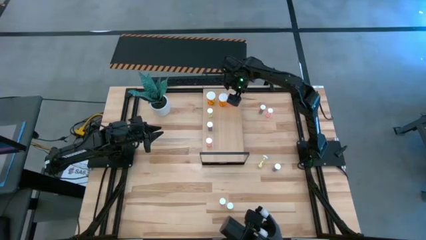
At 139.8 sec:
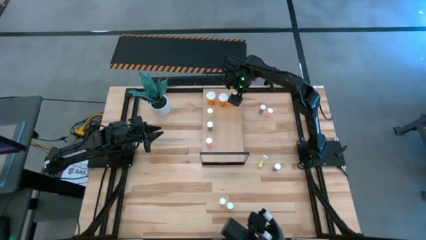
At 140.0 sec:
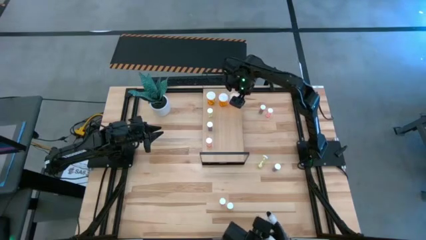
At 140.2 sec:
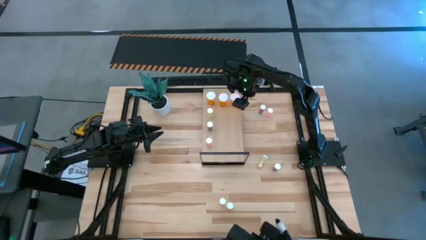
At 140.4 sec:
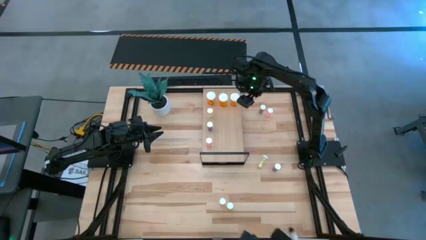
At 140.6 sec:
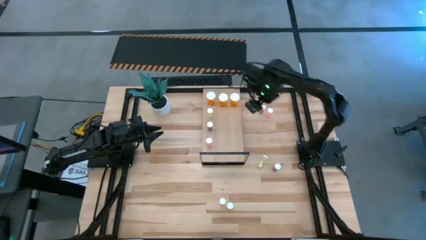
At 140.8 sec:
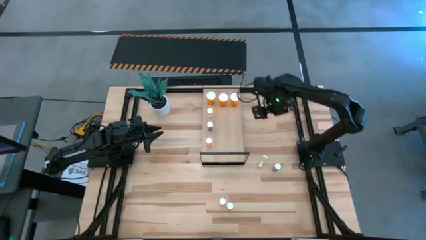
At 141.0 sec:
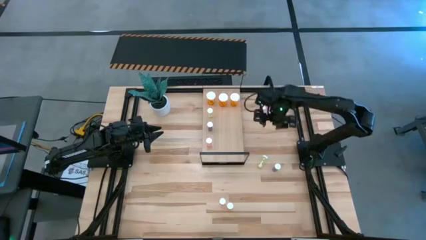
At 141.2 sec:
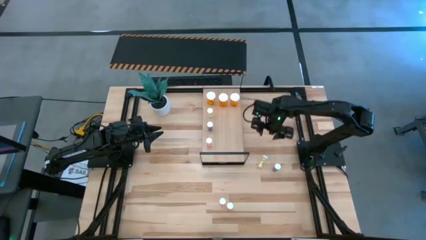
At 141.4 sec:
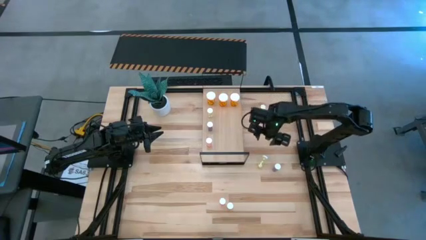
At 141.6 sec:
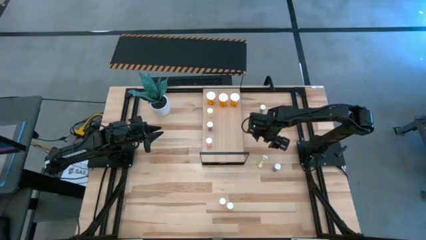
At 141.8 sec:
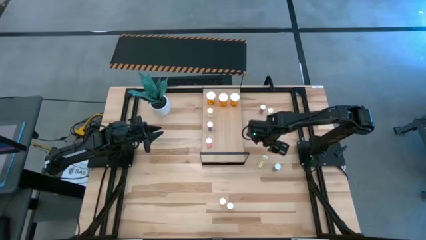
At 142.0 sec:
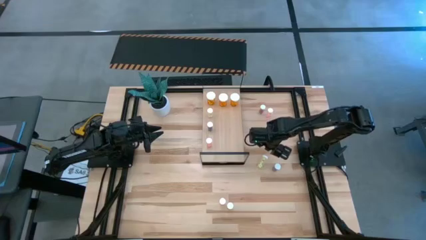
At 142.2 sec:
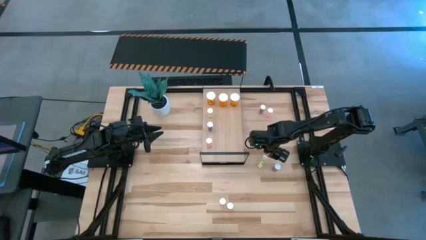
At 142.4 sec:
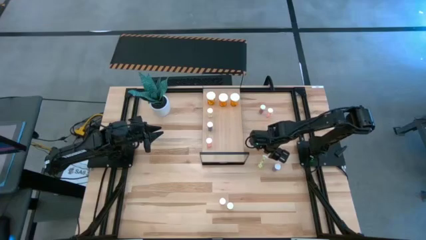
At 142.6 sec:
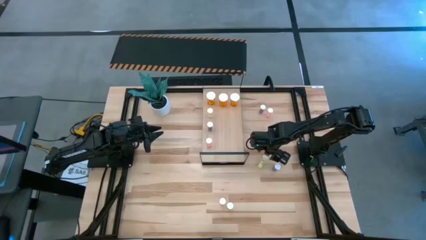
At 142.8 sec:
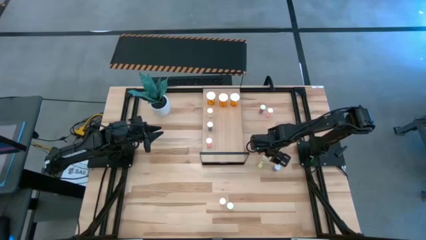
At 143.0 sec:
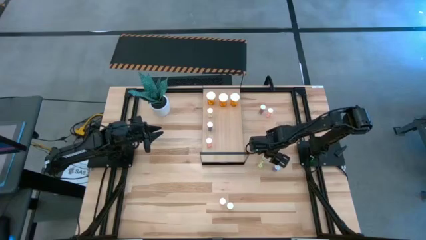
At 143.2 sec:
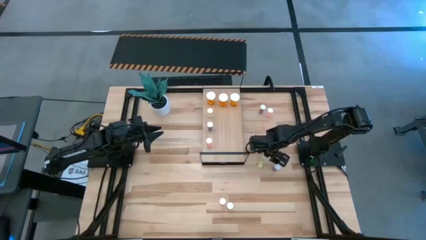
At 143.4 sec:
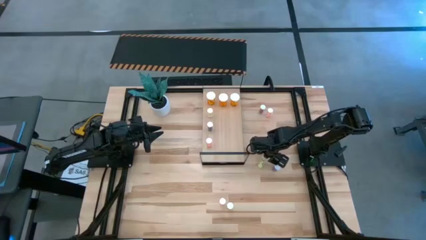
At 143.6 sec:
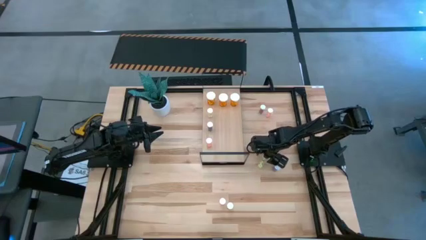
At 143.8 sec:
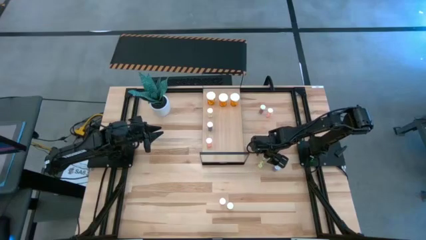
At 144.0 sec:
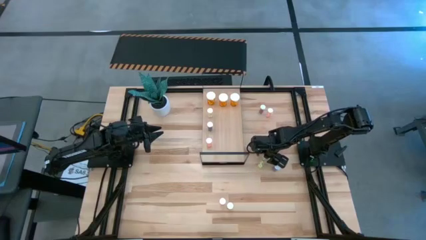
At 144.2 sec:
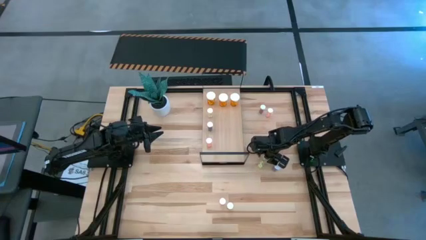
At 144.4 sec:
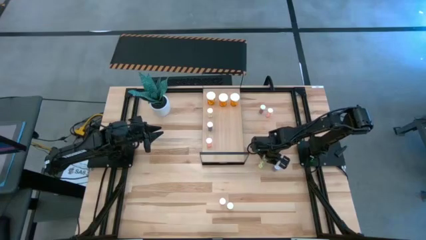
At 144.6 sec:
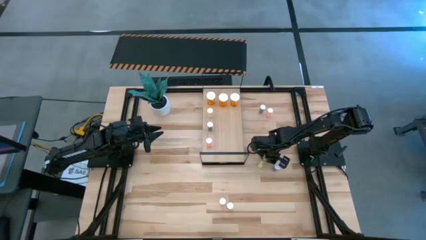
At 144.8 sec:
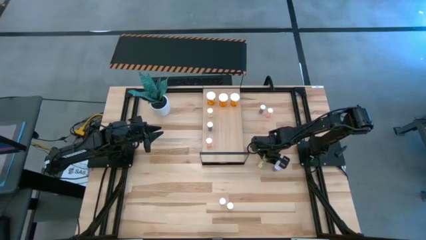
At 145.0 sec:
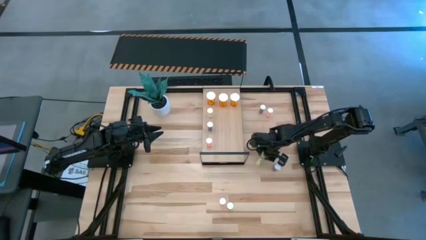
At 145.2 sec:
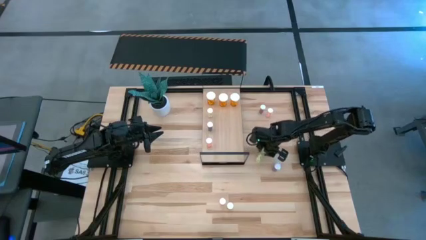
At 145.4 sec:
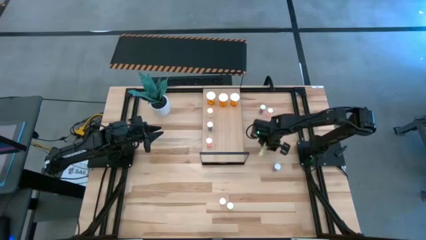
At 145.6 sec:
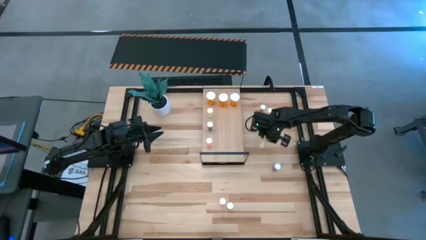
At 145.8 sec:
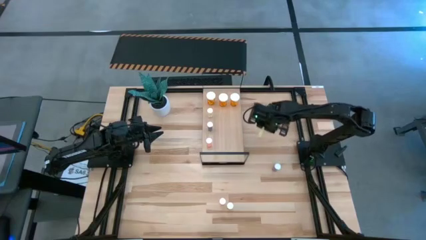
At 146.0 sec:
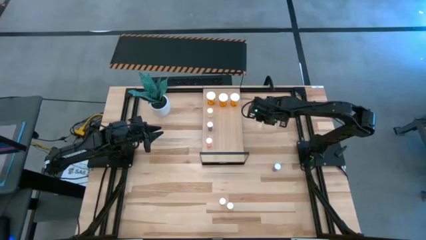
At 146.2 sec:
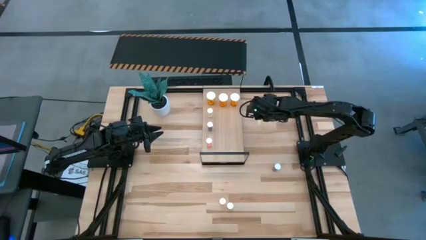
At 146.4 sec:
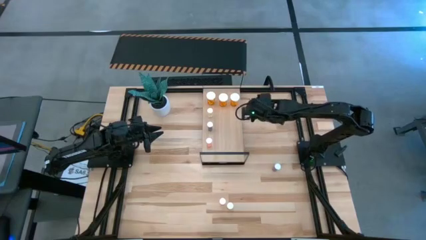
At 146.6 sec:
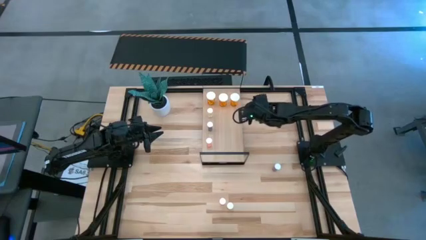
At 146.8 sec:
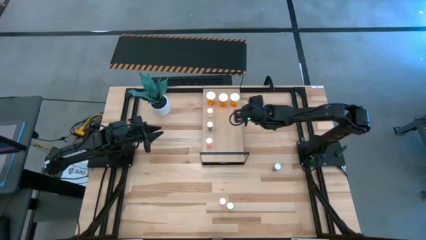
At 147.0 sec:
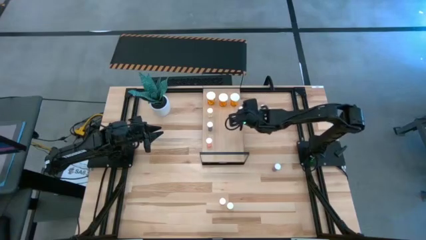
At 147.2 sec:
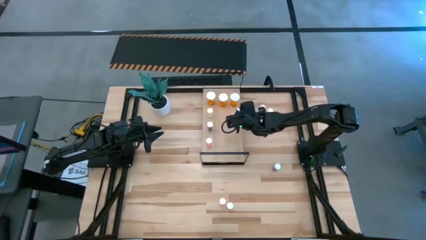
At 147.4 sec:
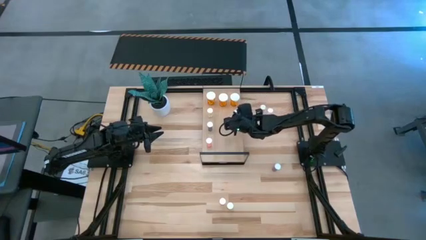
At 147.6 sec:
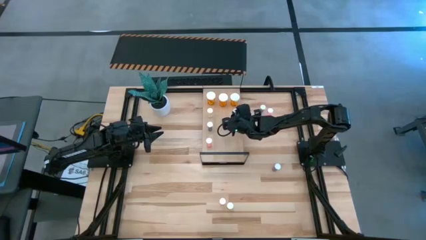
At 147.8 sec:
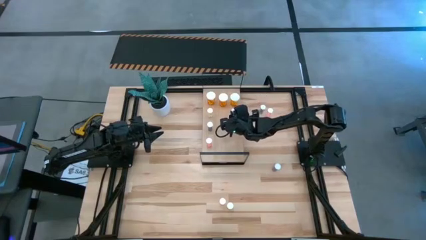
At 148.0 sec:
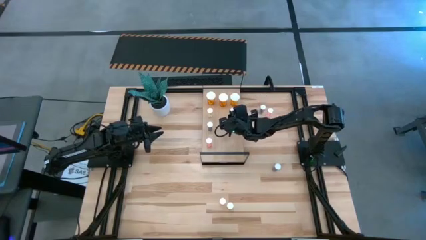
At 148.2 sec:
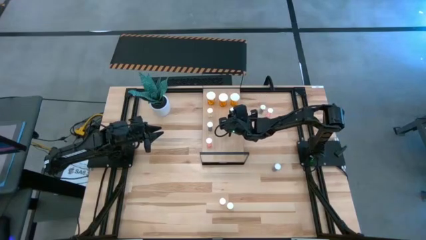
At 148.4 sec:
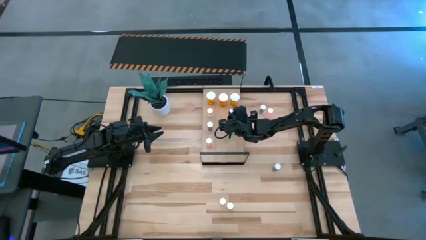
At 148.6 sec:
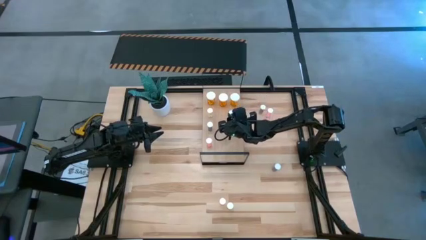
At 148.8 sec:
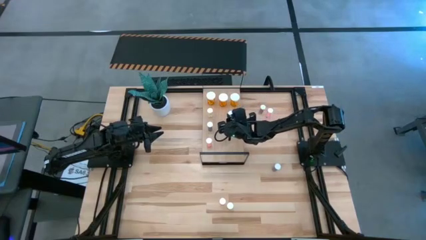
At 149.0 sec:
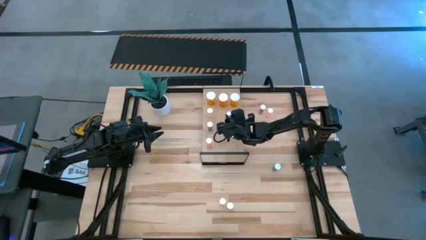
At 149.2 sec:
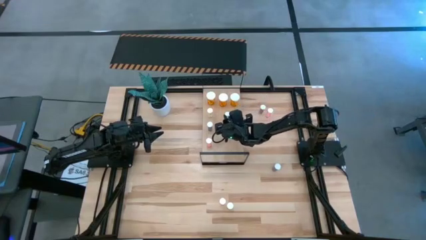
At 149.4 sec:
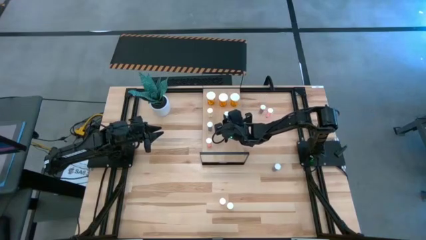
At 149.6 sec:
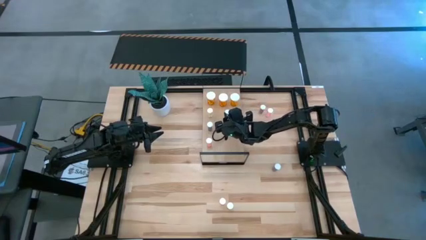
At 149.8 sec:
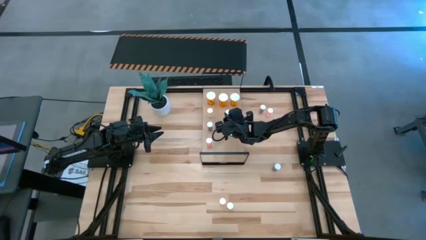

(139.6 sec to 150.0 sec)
Task: Pick and place medicine bottles onto shelf by color
Put the top small yellow pill bottle on the shelf aligned with the other small yellow pill bottle

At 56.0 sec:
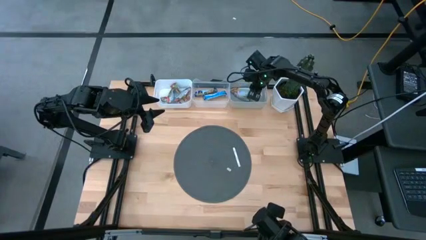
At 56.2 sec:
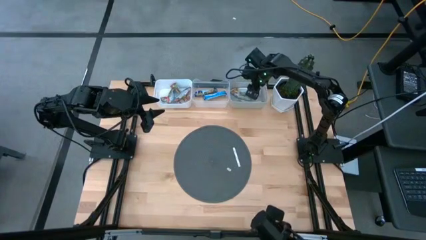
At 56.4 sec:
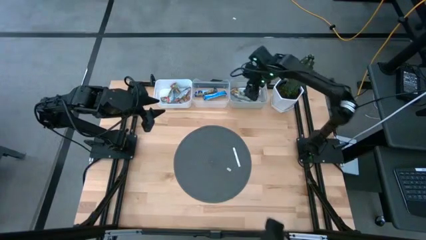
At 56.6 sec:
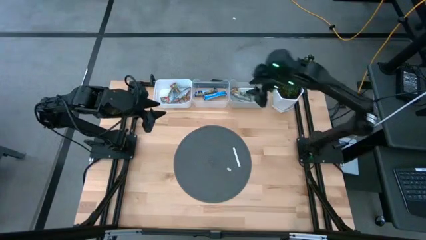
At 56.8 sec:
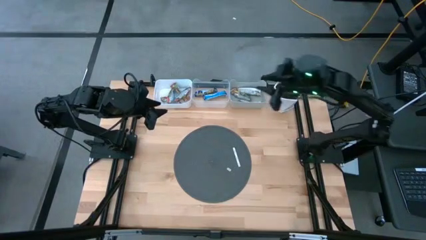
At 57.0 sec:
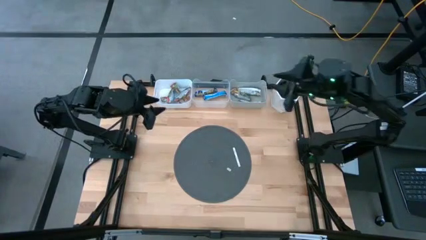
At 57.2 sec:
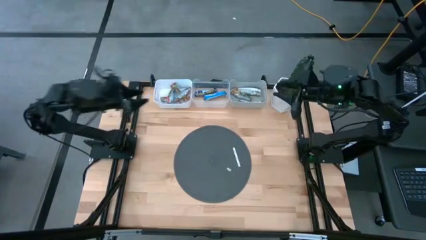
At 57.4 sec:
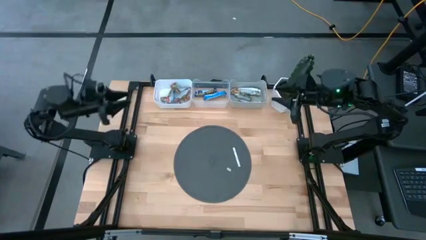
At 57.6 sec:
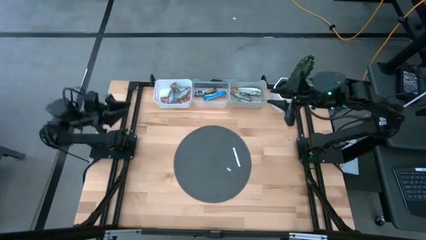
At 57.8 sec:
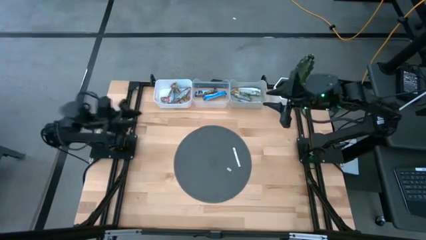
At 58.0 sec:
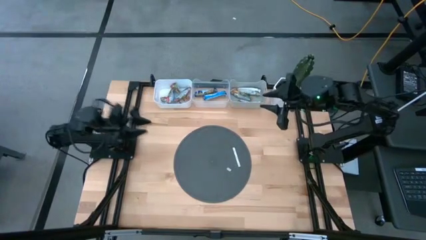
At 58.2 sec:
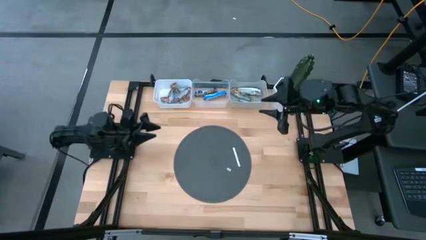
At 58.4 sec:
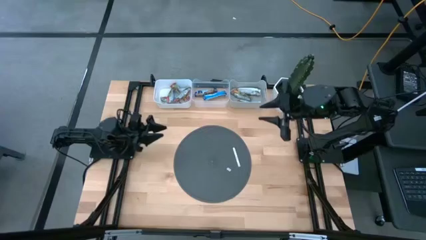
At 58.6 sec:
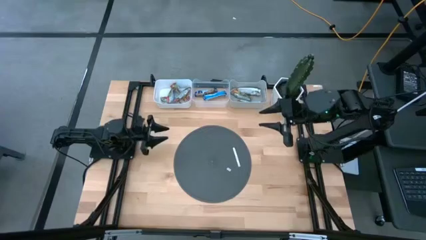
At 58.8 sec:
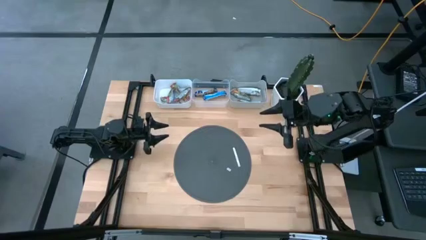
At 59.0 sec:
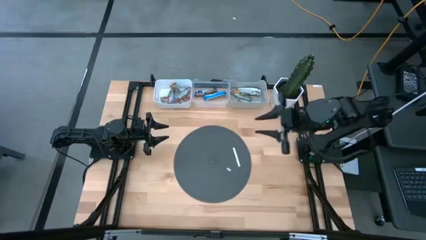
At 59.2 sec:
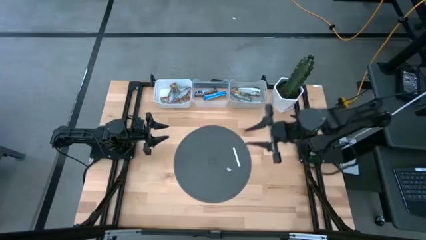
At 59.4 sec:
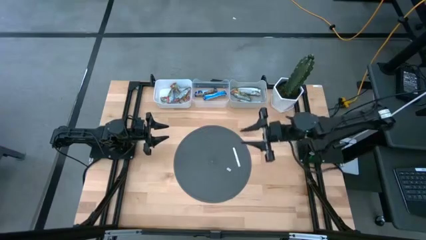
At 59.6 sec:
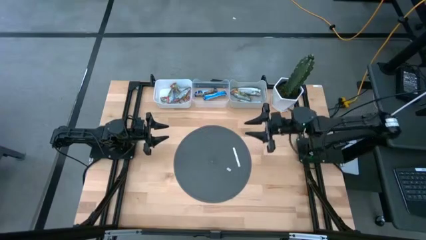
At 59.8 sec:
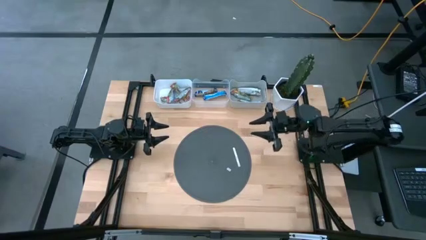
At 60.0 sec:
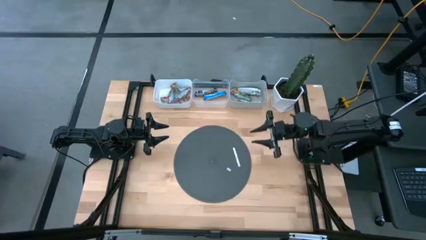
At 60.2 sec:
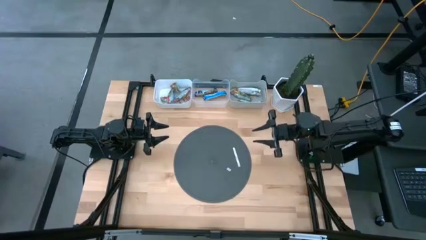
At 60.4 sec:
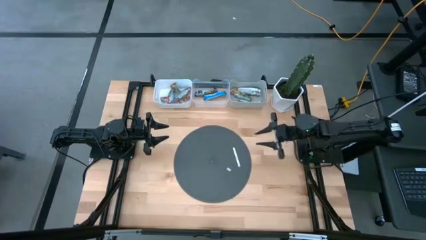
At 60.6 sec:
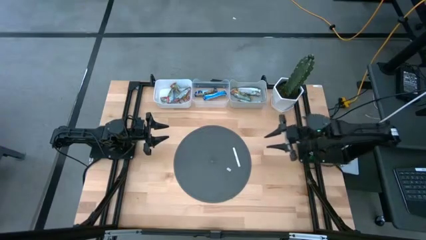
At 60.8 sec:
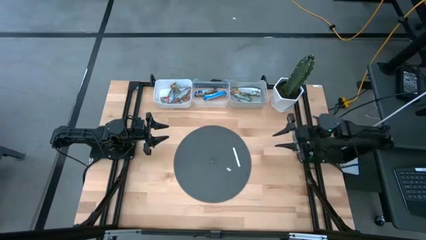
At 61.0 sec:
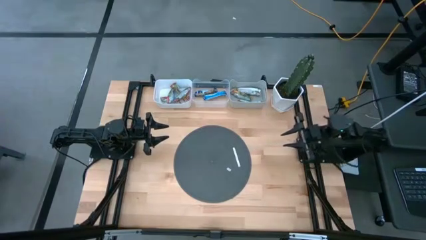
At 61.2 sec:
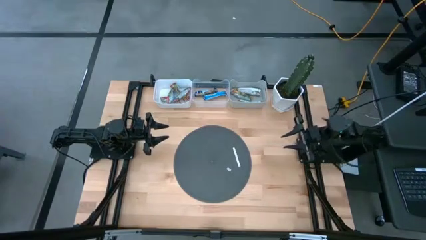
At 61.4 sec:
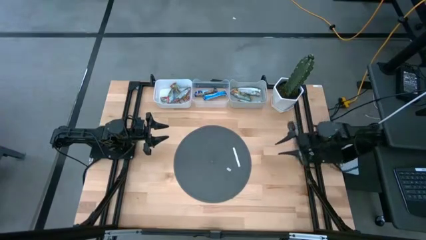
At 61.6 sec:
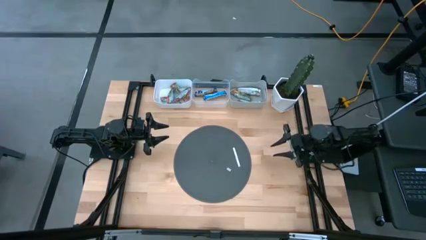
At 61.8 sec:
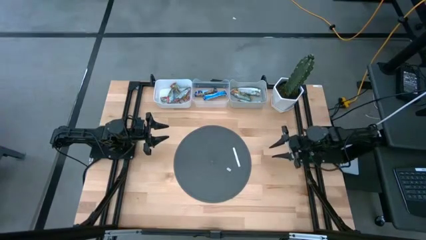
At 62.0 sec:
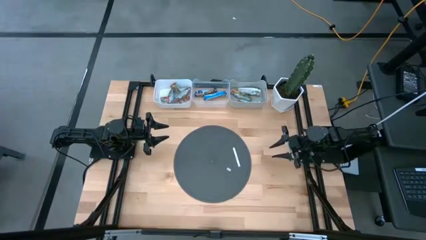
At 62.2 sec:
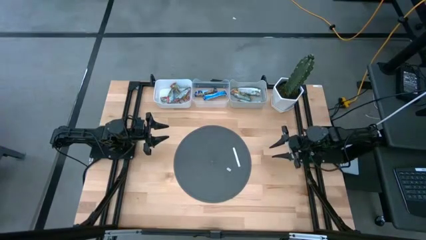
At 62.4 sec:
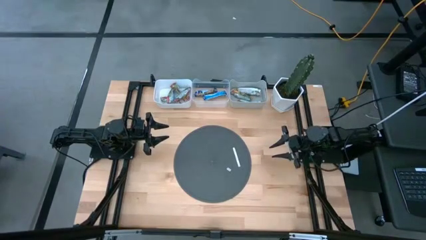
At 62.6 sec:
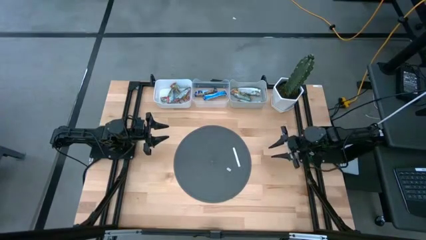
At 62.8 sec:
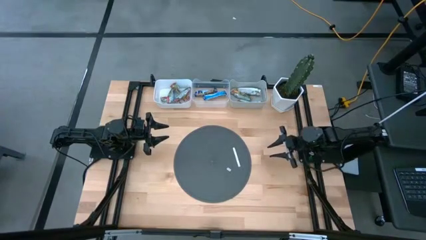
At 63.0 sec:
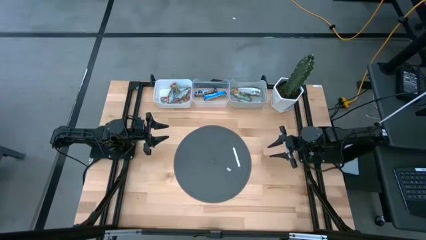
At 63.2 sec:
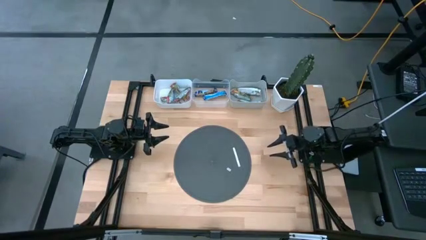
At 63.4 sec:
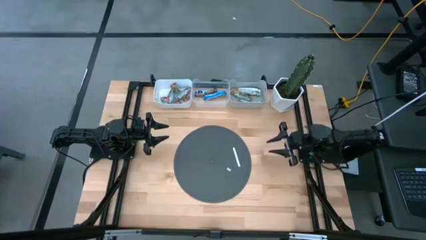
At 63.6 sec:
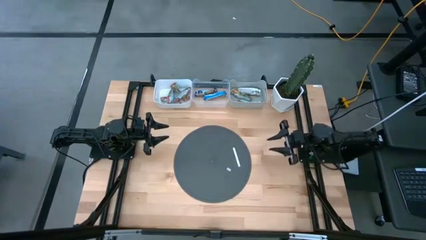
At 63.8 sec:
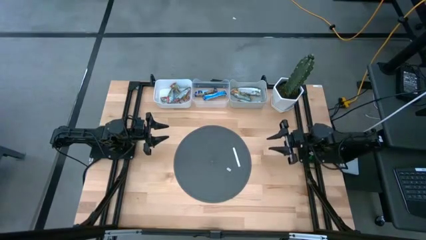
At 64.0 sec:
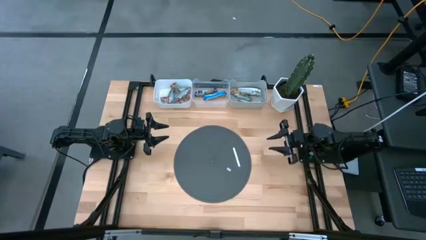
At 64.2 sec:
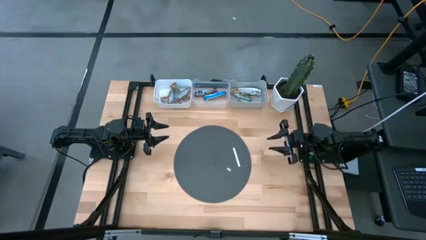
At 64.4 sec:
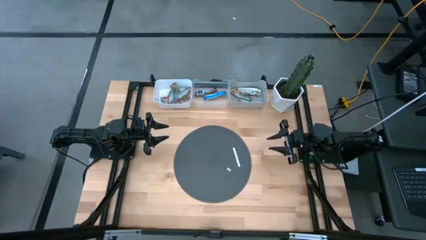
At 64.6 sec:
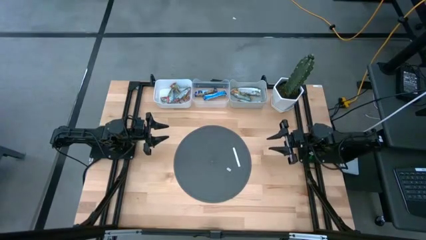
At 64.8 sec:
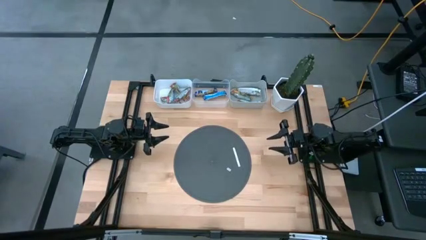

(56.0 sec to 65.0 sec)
Task: Pick and place Granola Bars by type
Return to Home Position
